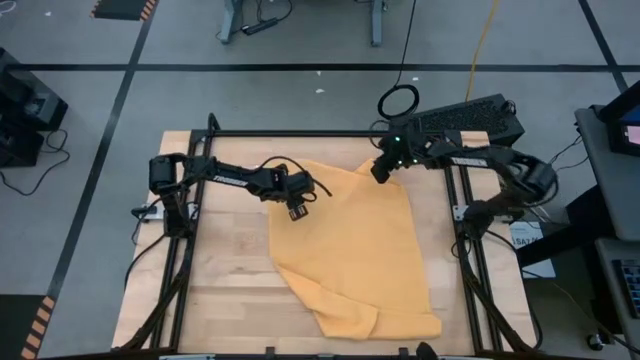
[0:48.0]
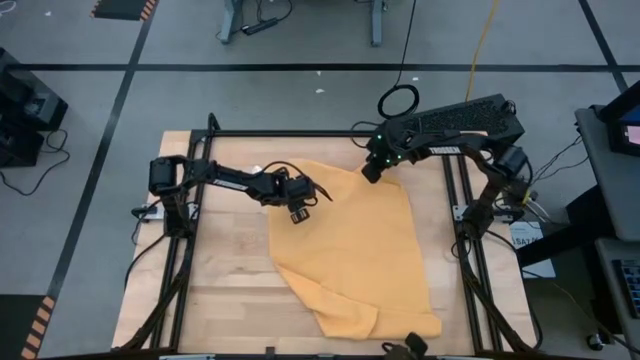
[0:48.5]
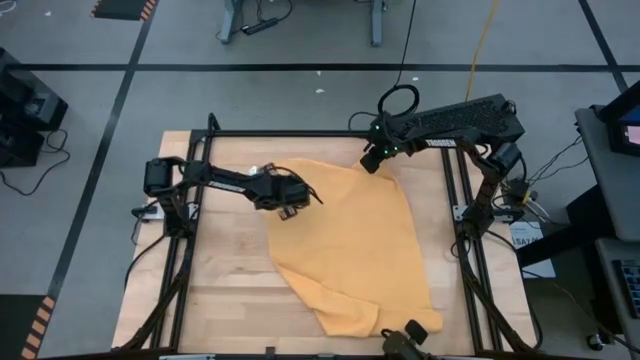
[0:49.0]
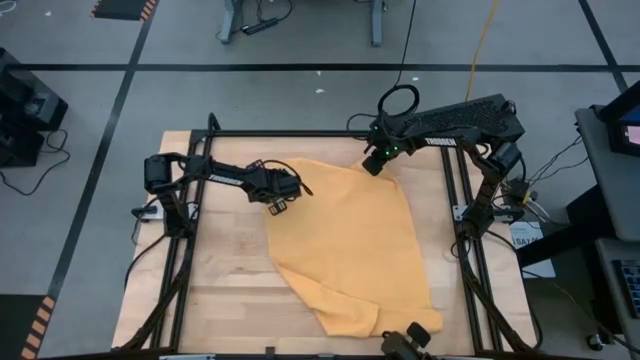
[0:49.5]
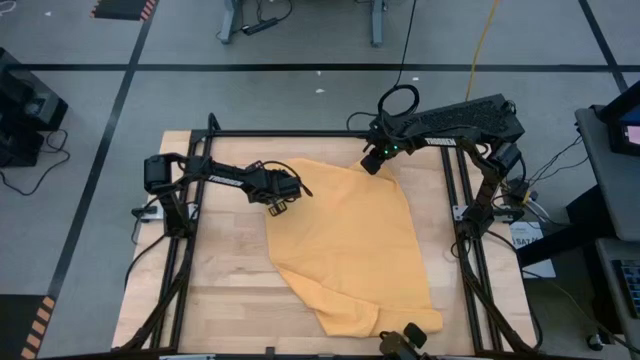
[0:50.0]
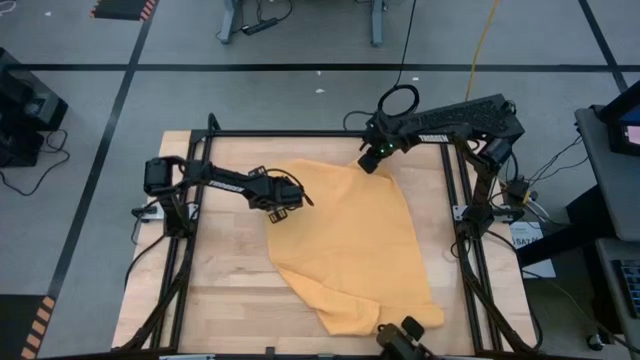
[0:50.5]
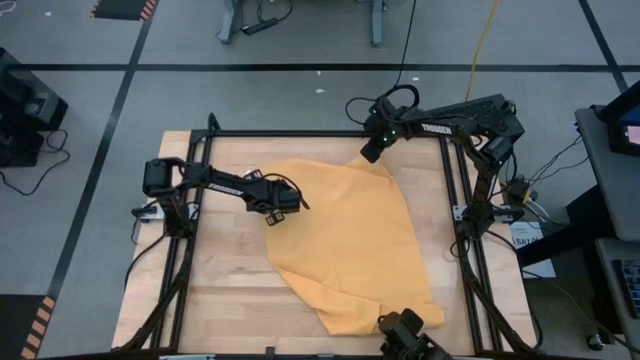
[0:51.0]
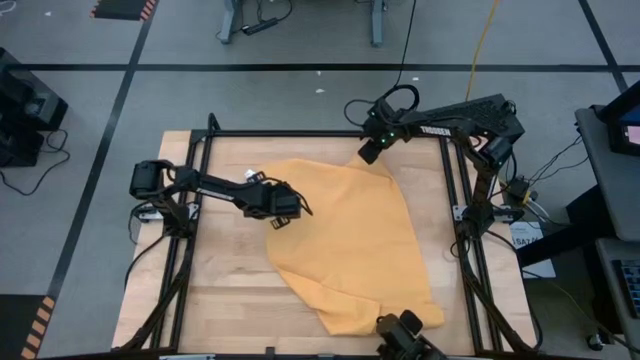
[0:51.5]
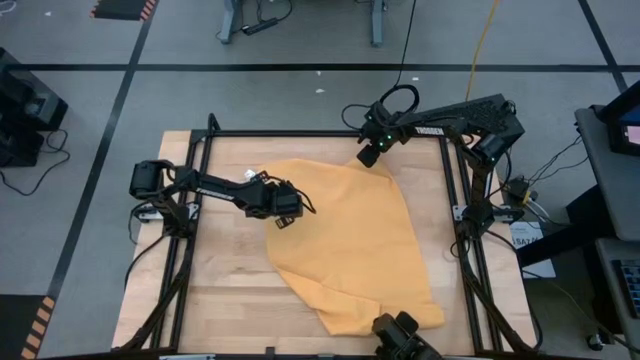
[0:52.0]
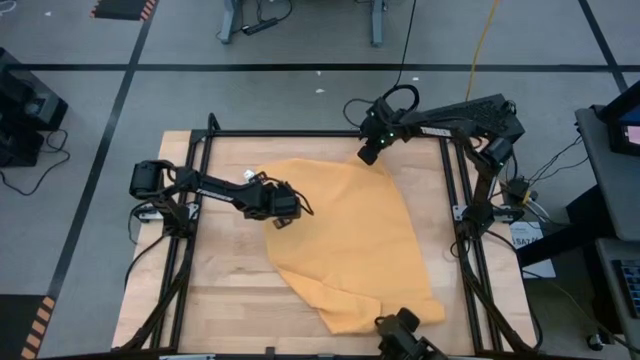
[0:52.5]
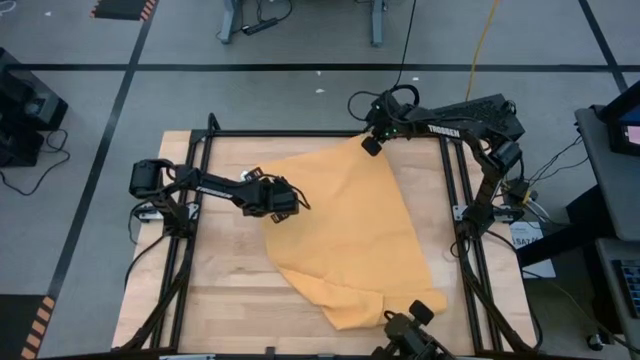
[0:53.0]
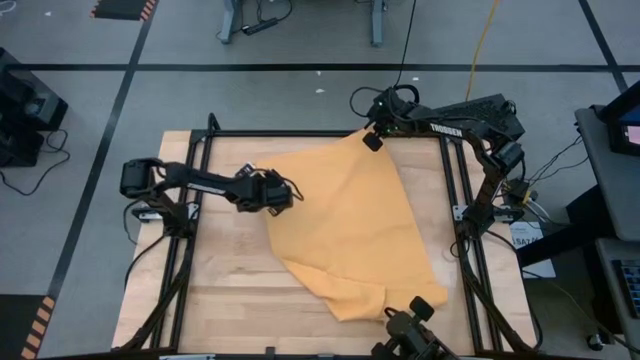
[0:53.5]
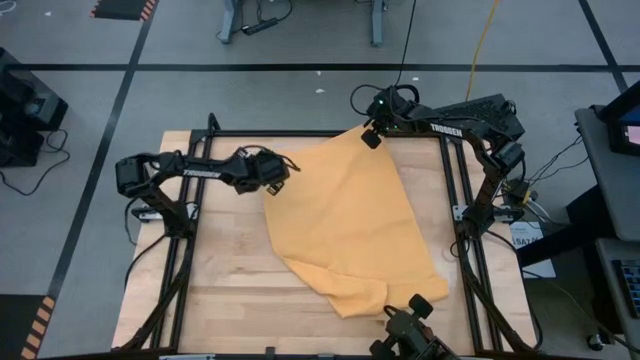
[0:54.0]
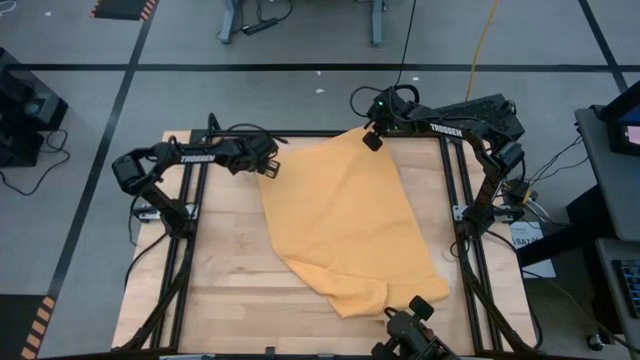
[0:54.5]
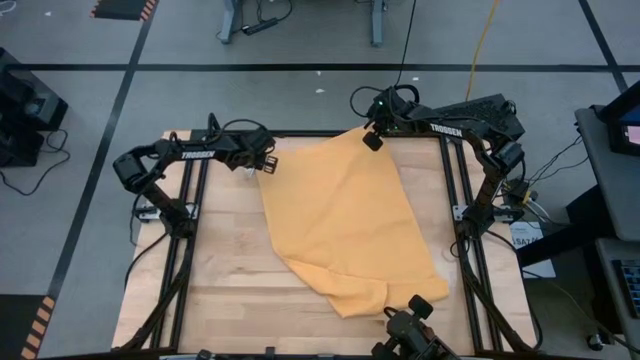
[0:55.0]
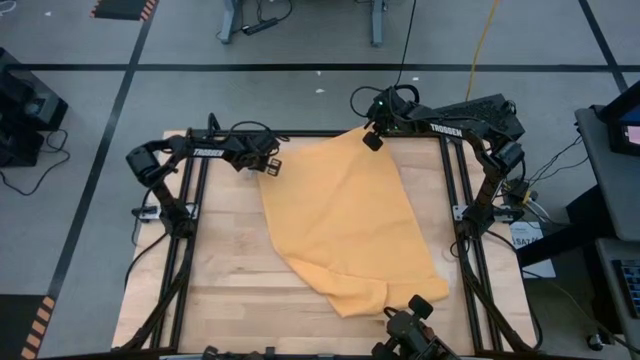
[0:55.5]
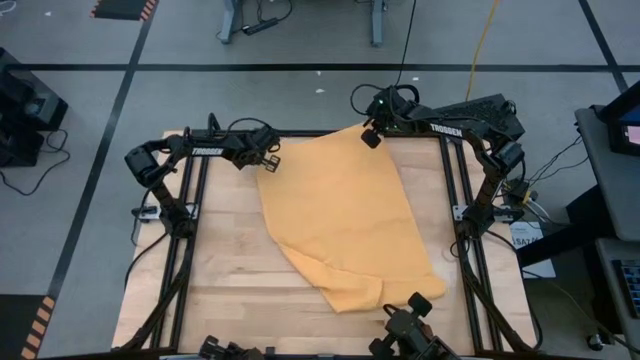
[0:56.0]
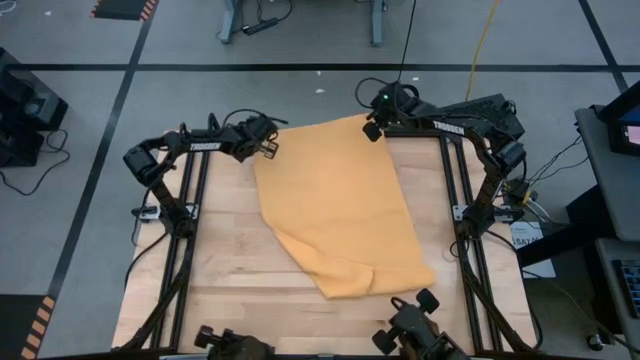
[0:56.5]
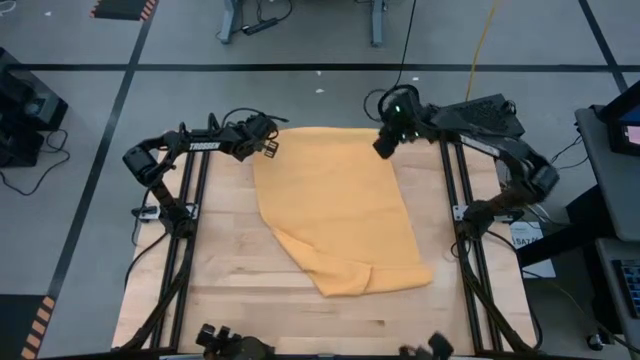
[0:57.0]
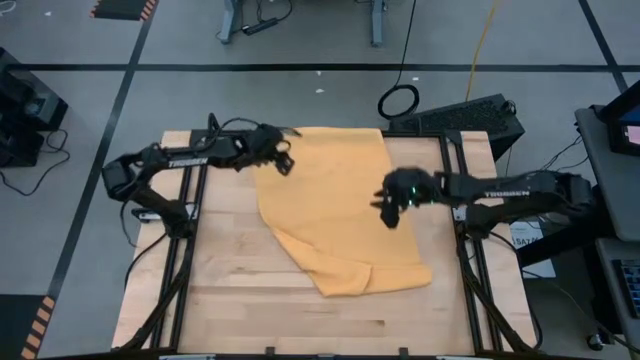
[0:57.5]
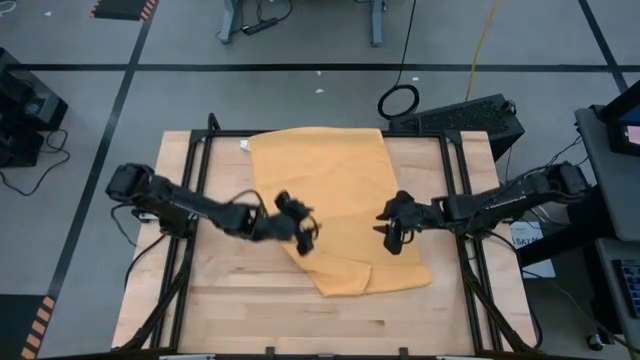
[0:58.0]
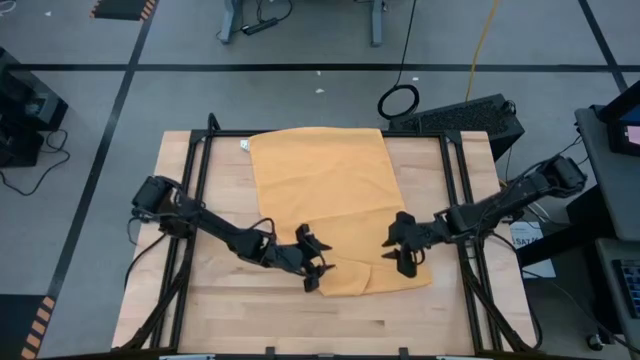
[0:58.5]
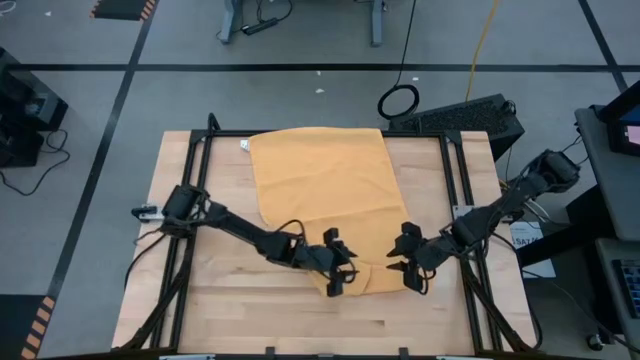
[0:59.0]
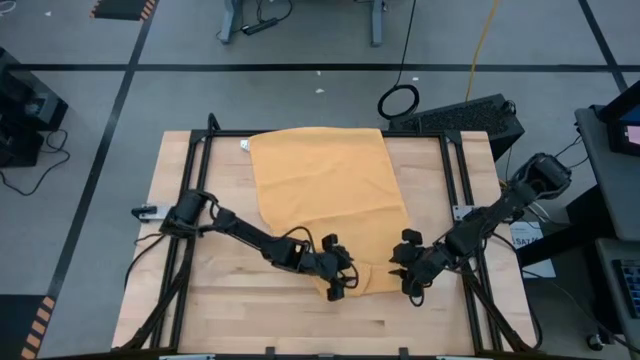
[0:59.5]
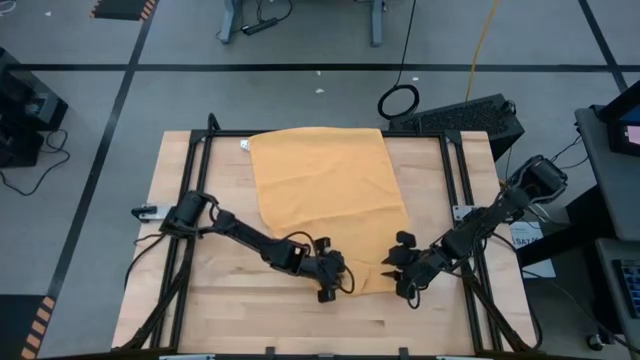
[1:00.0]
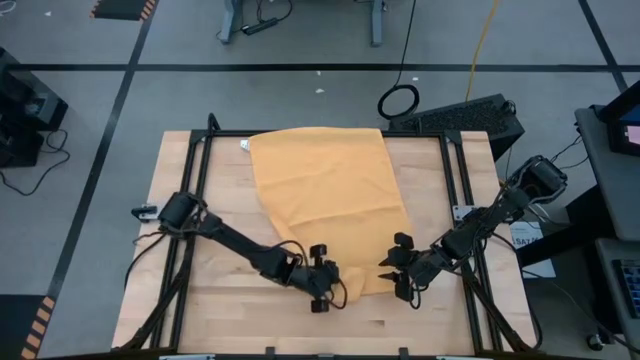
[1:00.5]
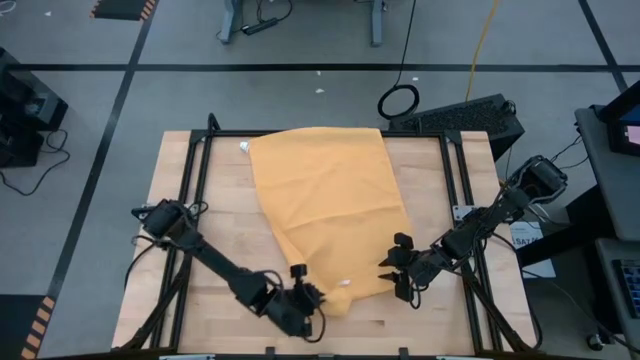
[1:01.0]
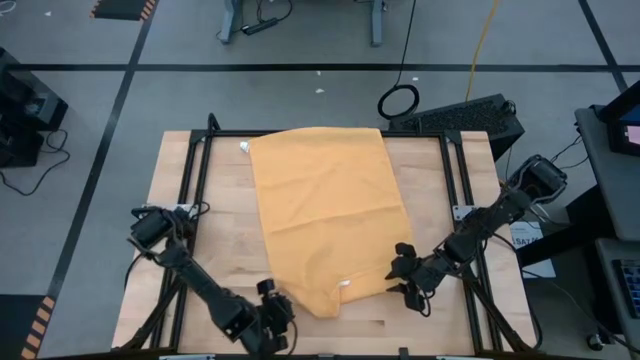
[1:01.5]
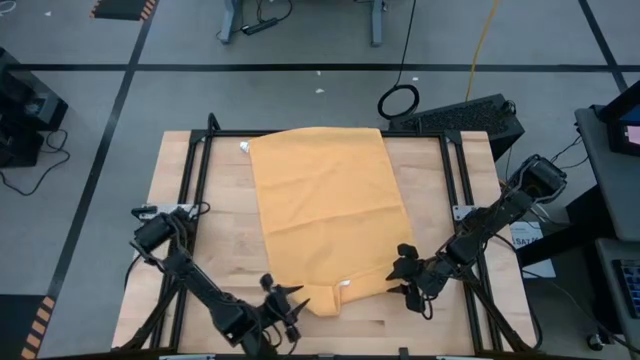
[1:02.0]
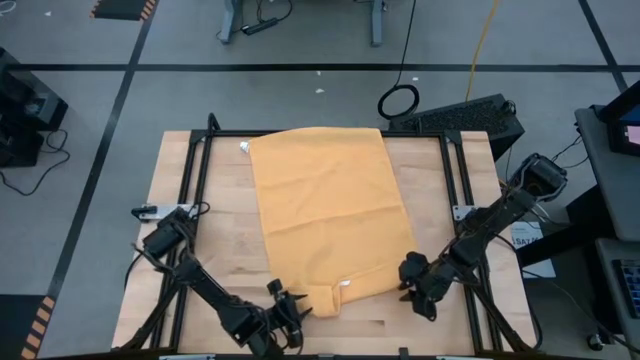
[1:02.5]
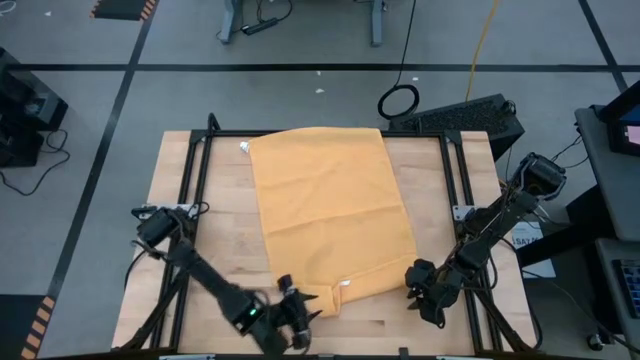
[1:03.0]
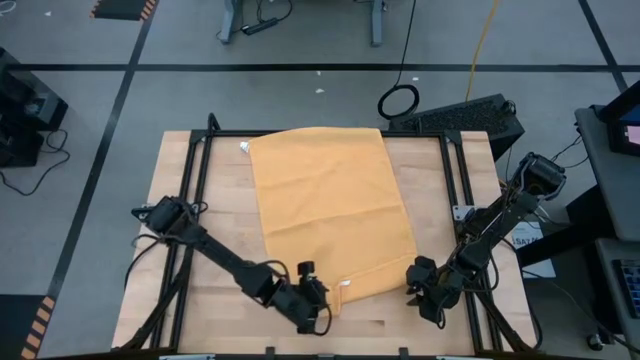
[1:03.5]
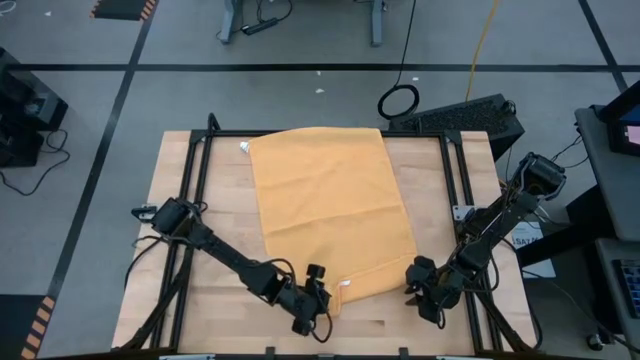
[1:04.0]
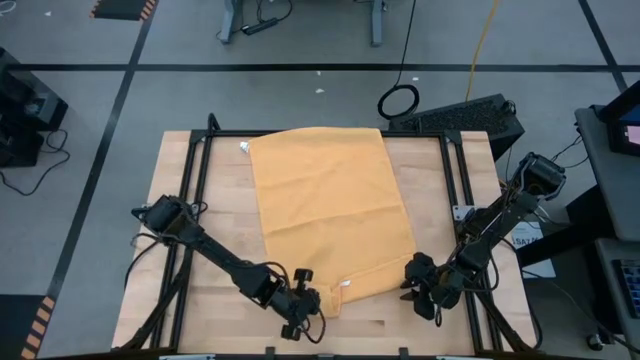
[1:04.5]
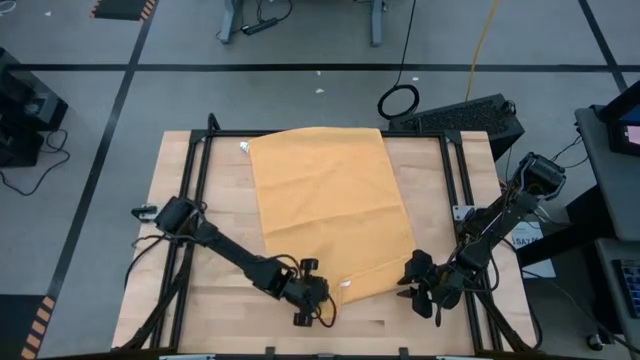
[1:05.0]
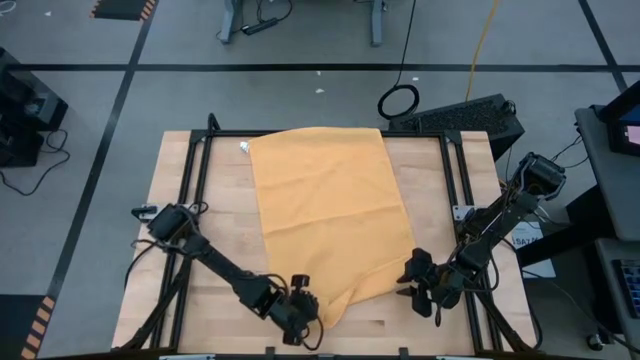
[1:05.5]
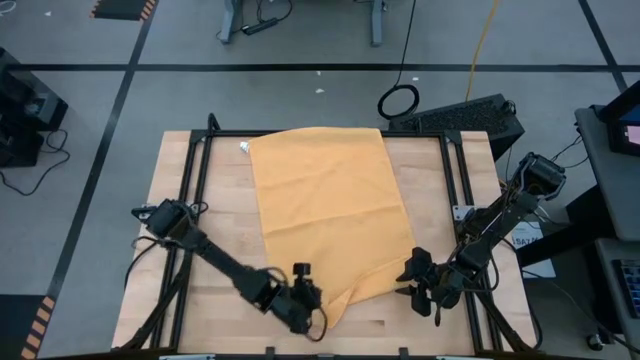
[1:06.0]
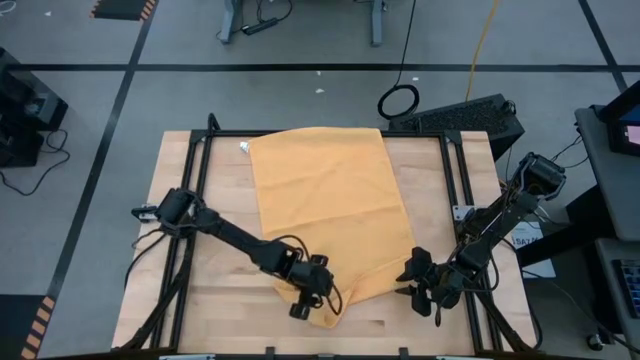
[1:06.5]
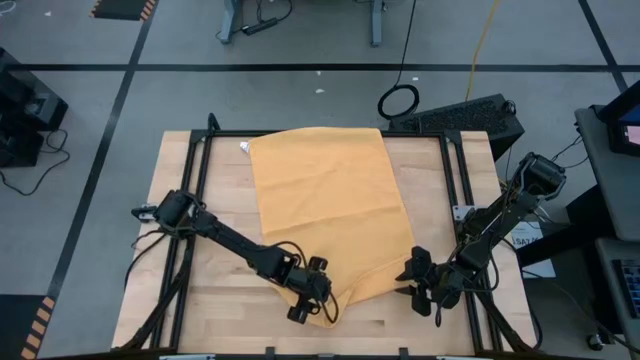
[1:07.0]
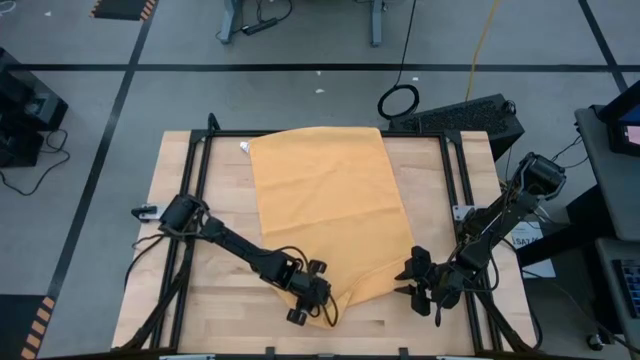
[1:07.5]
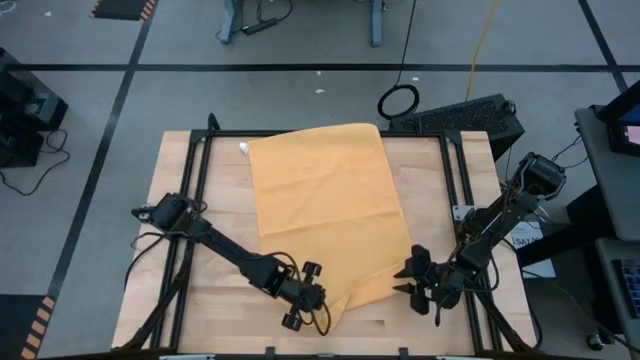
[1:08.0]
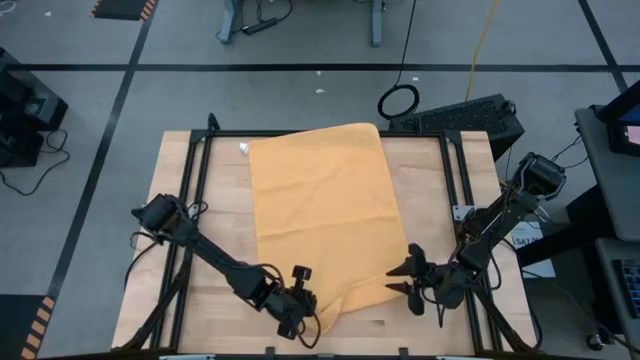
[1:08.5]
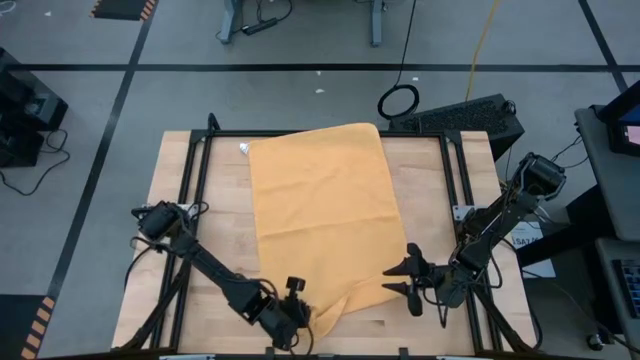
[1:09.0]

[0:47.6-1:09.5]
Task: Roll towel
Fold the yellow towel
